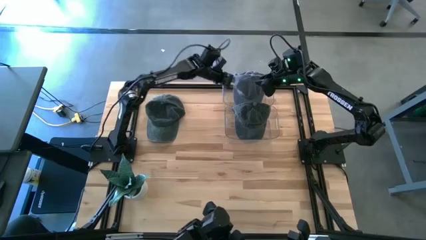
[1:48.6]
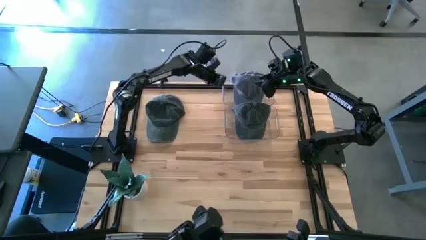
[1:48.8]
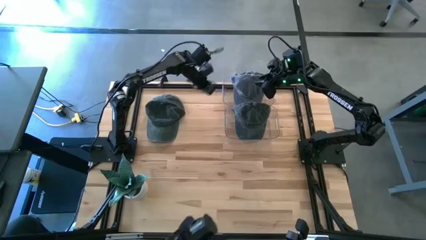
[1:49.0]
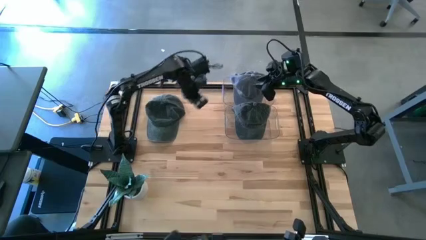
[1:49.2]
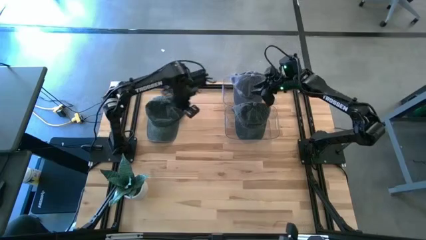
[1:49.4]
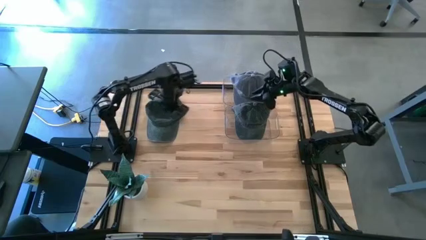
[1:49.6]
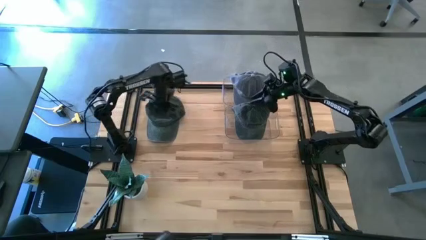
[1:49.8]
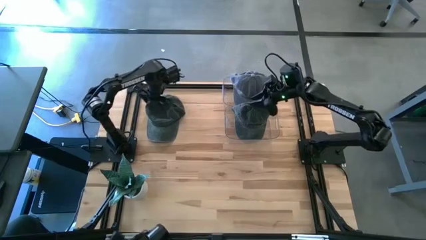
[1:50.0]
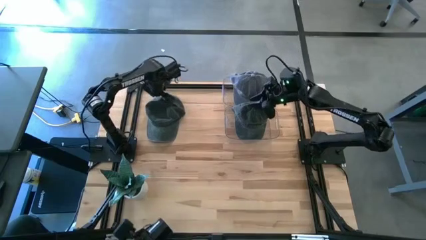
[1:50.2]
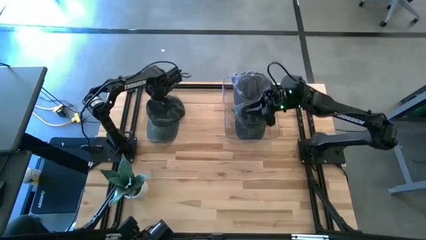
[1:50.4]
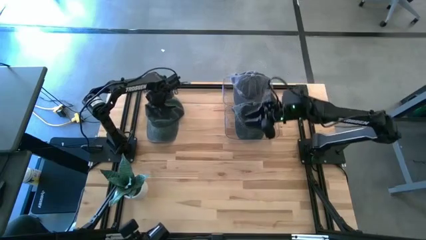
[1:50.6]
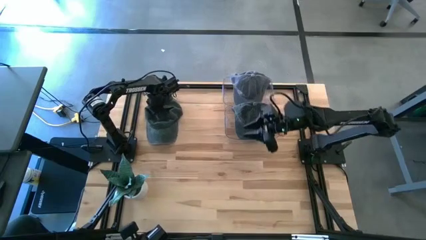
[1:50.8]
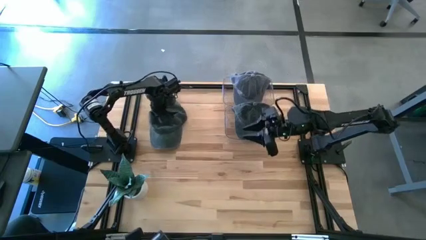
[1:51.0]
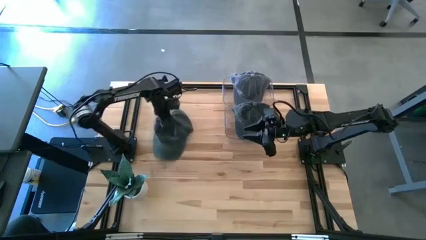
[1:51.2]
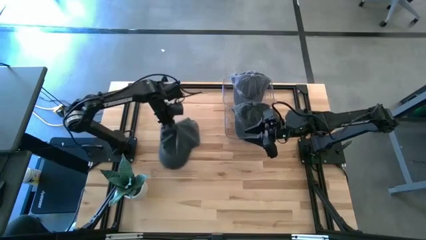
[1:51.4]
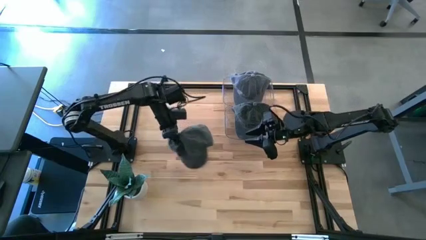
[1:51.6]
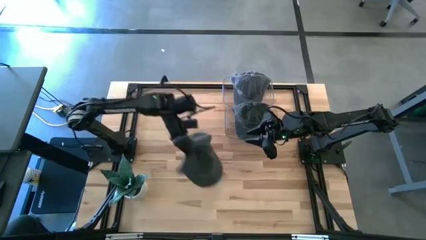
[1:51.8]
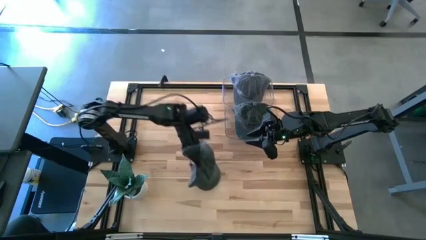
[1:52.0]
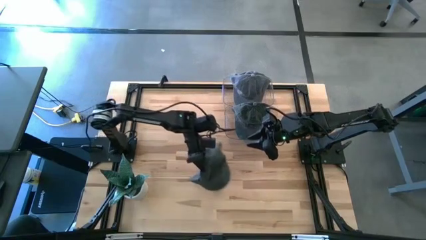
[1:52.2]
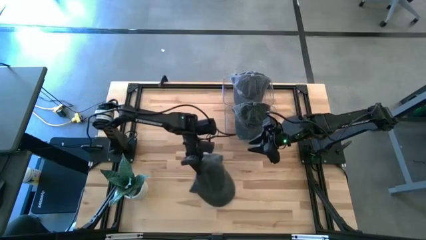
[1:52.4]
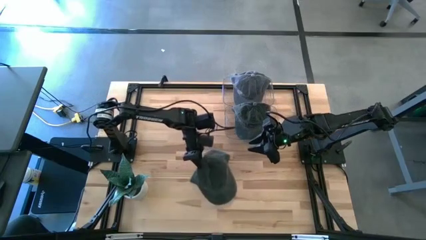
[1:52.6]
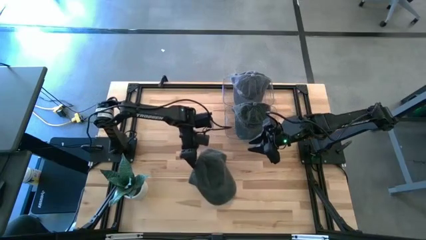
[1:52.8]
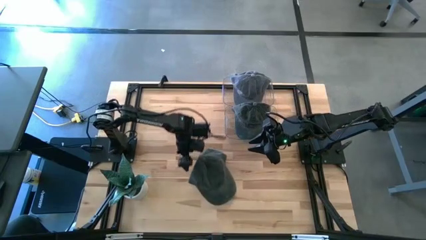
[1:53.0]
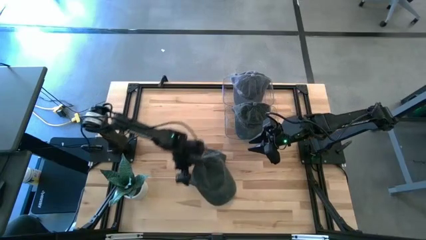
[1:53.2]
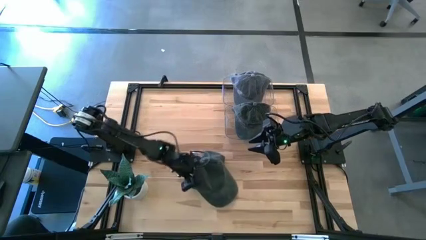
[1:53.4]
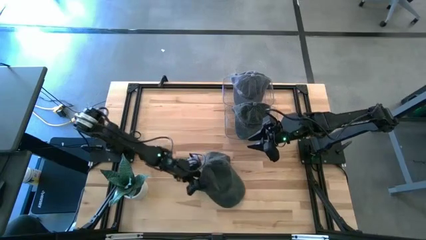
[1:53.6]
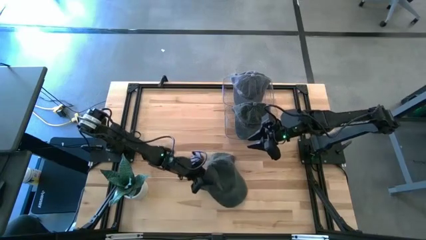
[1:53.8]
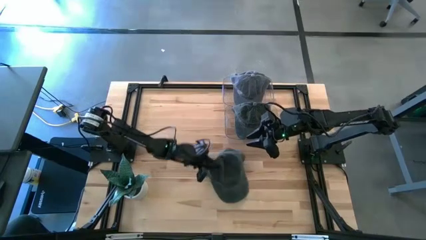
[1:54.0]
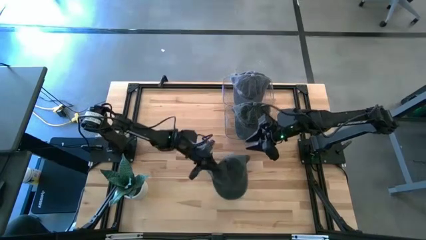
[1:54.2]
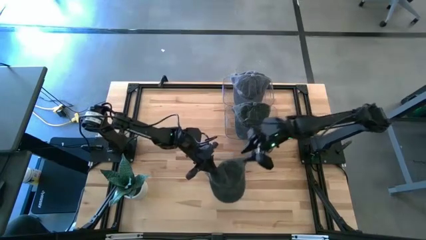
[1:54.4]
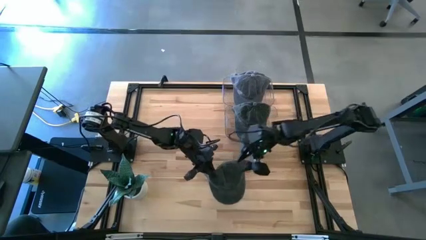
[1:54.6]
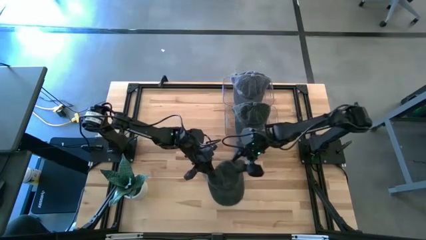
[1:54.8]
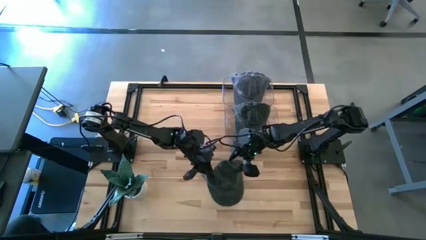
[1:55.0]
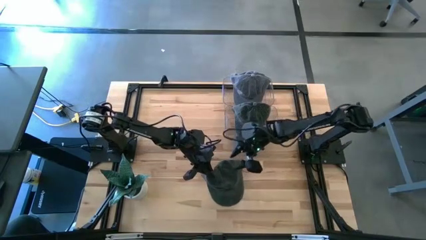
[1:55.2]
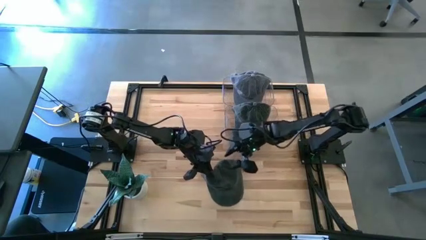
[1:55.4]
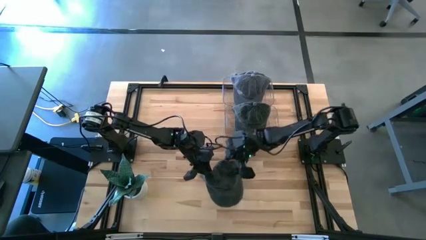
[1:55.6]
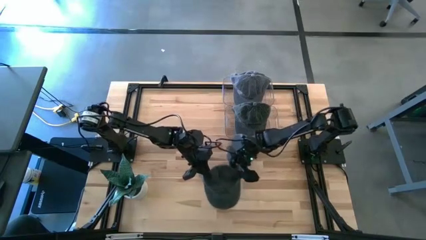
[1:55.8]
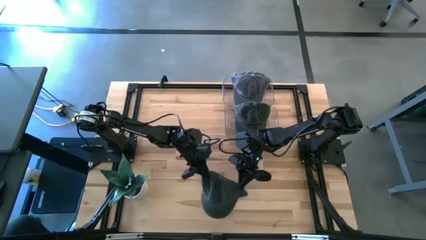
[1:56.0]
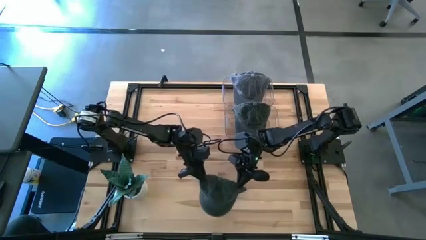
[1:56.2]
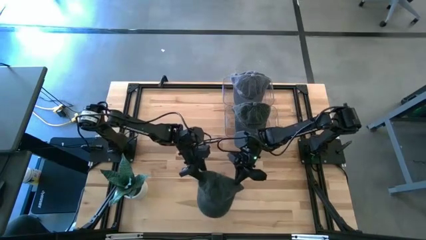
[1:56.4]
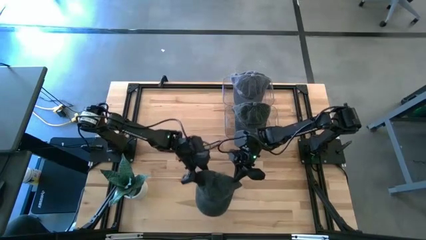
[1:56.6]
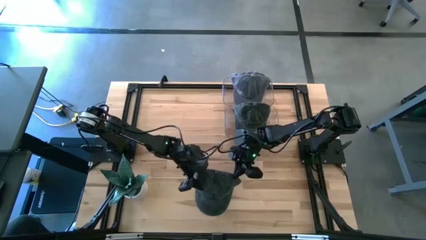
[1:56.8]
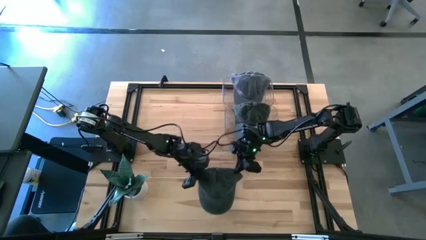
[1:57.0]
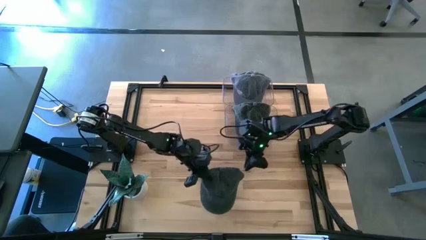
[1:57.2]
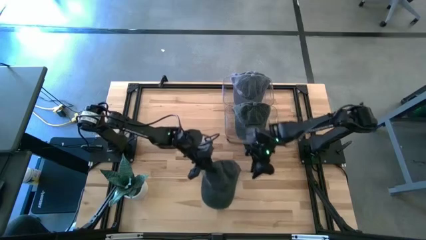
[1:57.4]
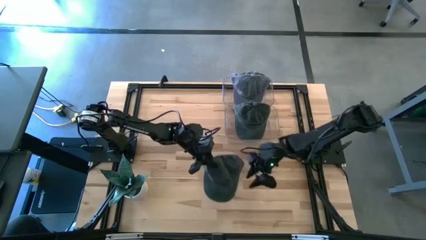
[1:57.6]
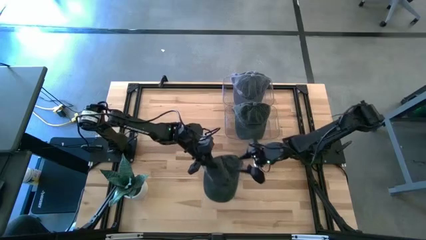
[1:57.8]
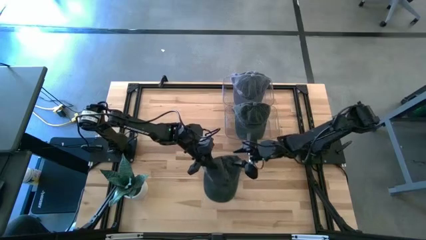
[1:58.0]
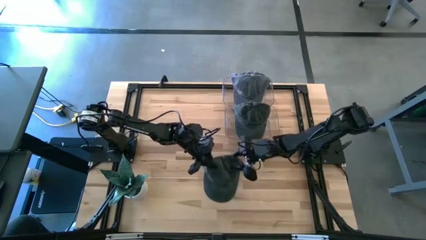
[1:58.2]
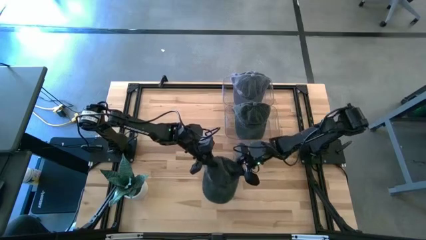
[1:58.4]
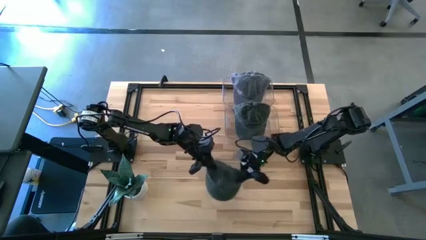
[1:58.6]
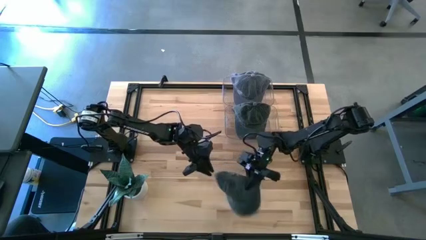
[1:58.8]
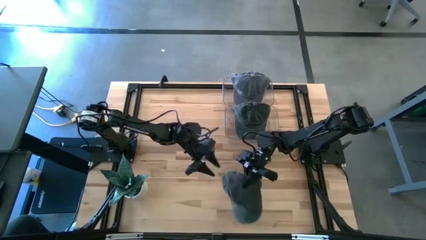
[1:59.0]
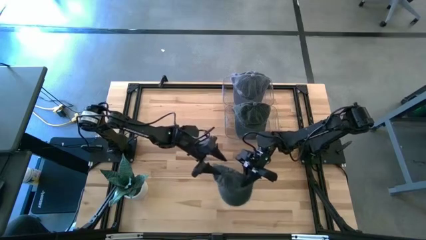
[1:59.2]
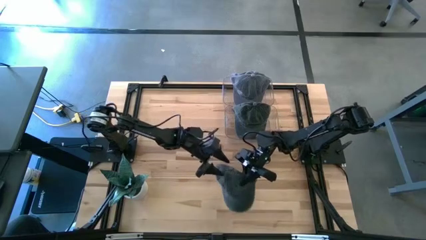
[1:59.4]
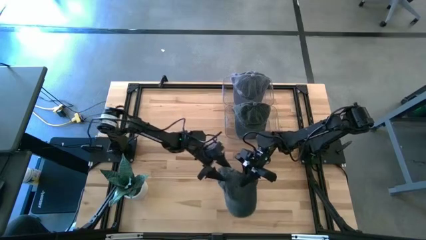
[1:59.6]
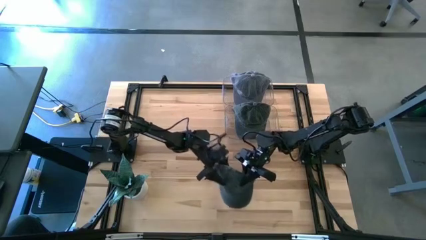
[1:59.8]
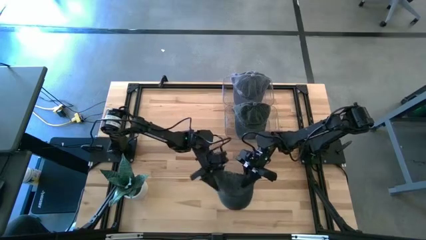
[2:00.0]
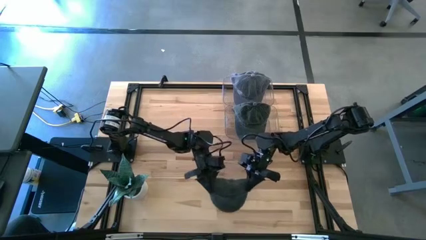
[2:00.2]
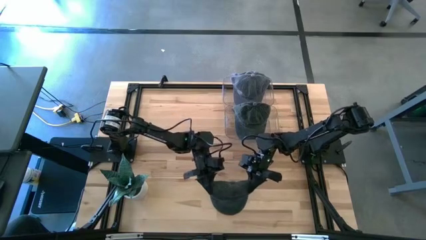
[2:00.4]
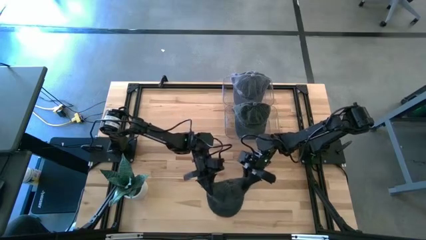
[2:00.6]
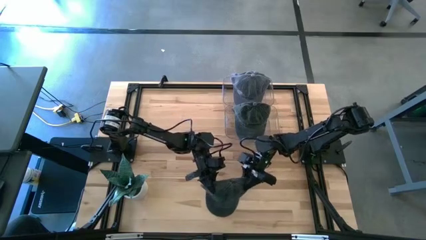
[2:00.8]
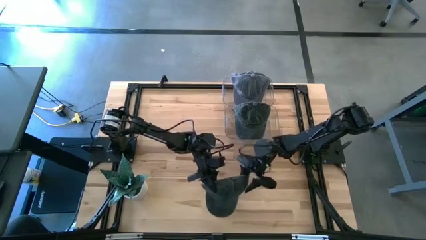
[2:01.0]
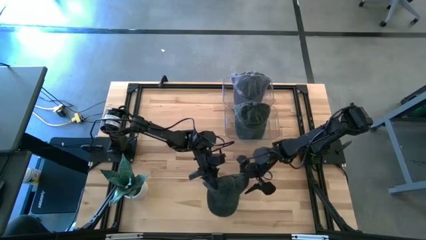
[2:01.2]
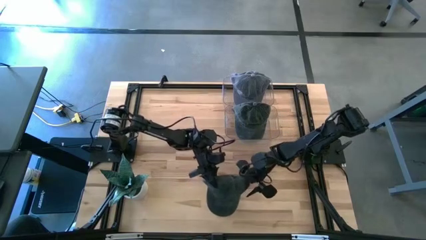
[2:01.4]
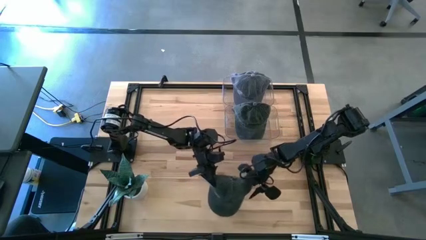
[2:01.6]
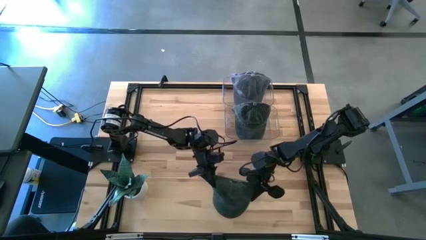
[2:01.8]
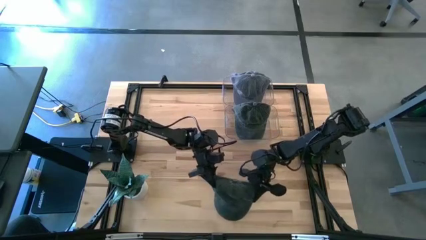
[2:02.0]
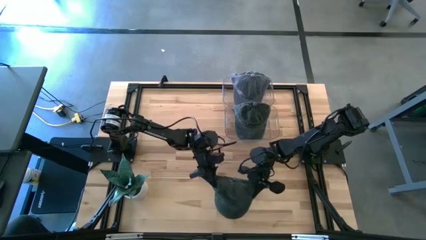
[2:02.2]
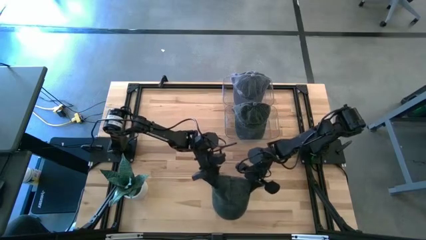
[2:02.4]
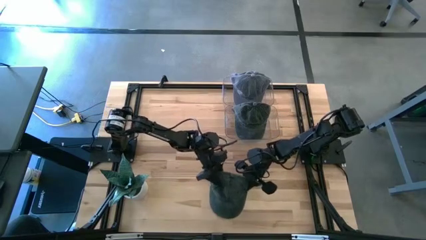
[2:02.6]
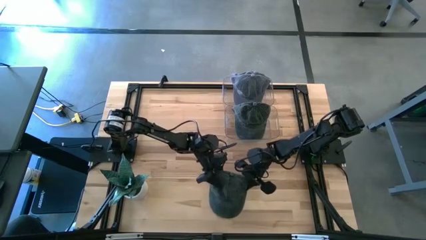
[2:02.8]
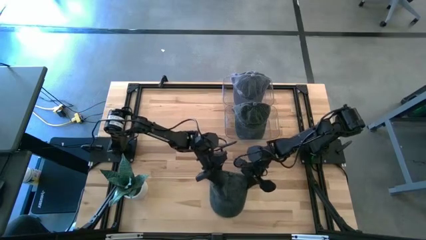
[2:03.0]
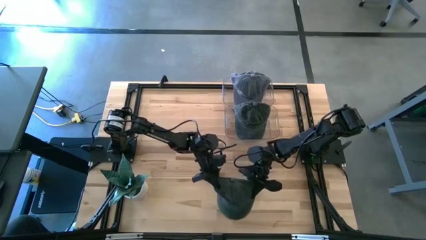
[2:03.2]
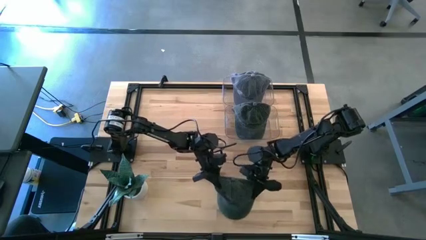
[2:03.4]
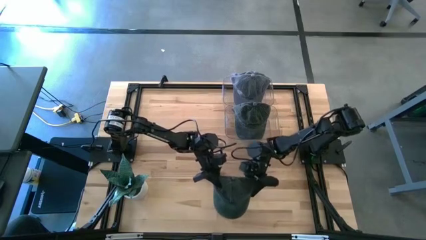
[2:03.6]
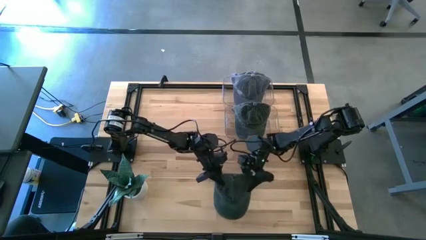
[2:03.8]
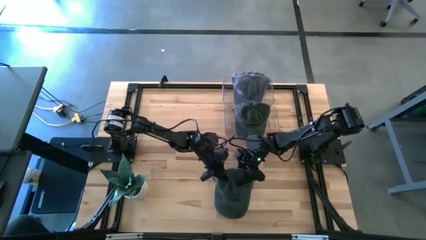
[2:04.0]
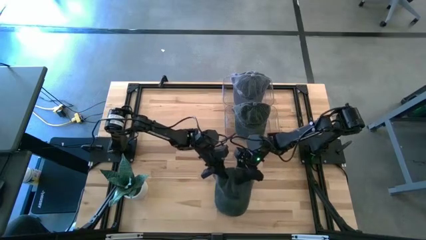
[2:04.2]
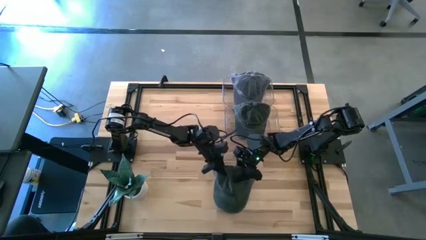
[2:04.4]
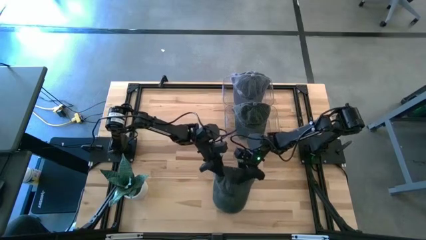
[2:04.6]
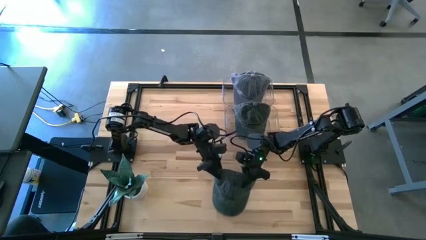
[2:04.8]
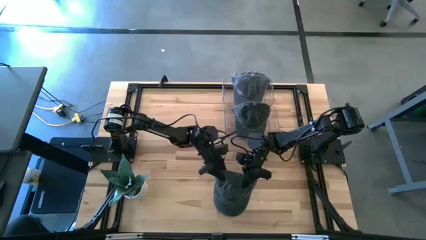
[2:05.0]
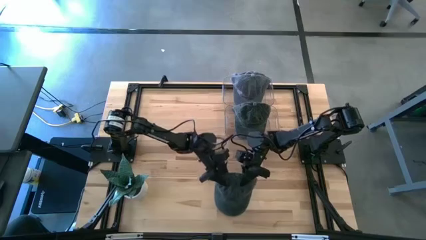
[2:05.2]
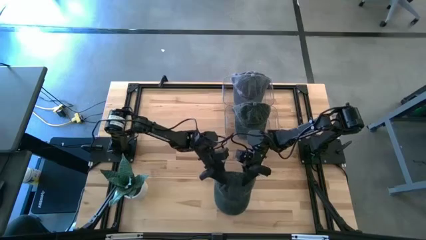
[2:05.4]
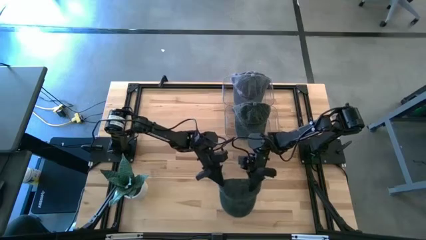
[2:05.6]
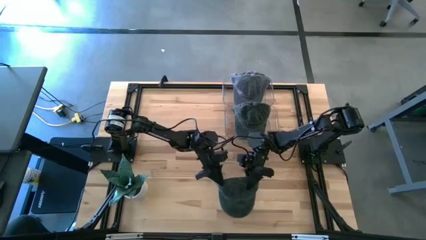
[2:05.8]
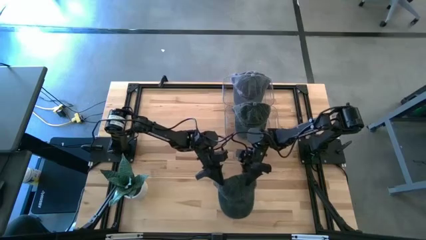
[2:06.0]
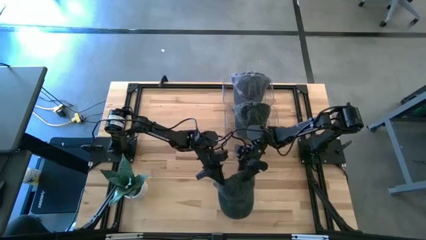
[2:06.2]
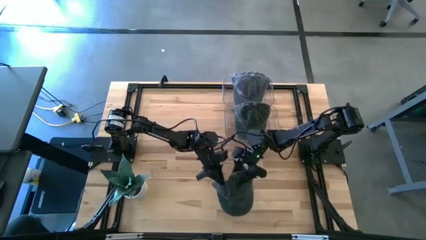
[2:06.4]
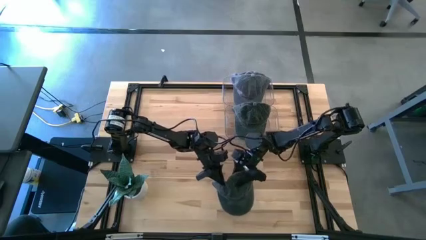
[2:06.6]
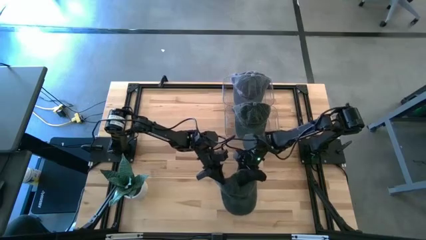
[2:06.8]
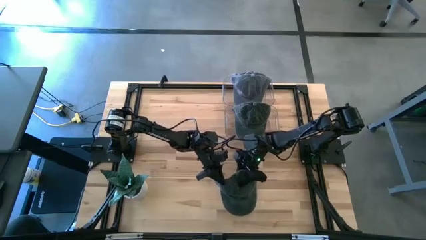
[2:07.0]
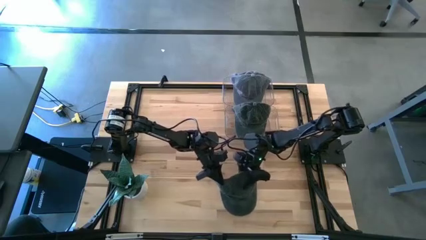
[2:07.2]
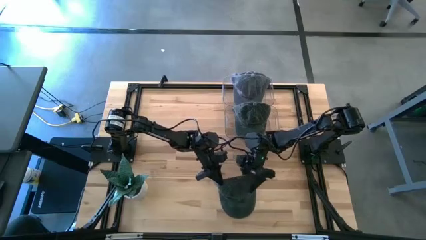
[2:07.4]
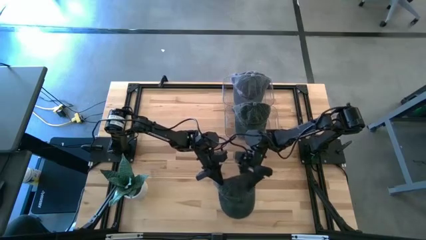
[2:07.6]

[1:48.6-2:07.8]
Task: Pick & Place hat
Put the black cap into the bottom transparent bin
